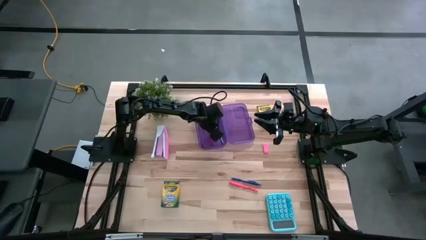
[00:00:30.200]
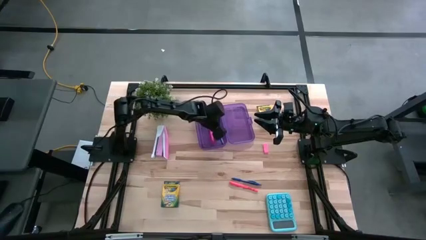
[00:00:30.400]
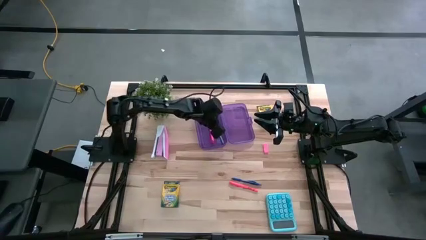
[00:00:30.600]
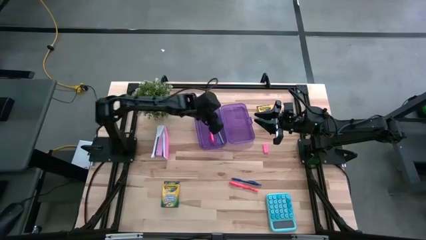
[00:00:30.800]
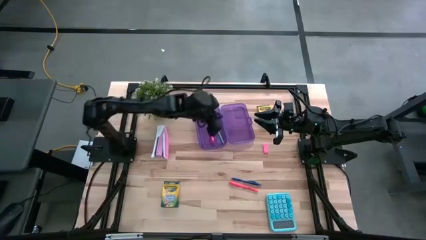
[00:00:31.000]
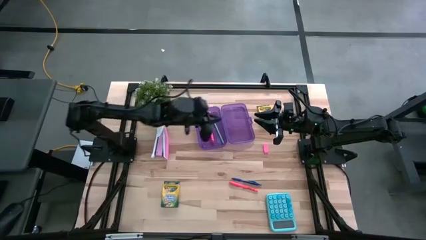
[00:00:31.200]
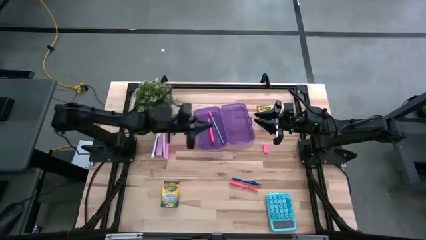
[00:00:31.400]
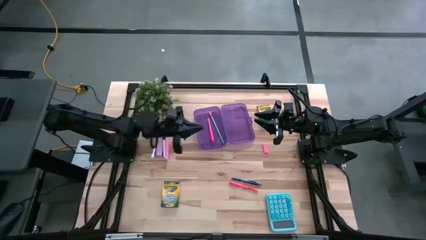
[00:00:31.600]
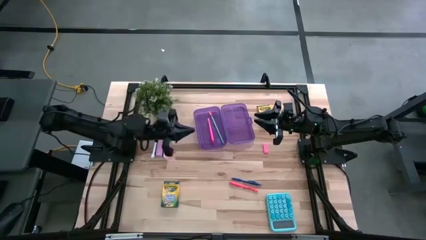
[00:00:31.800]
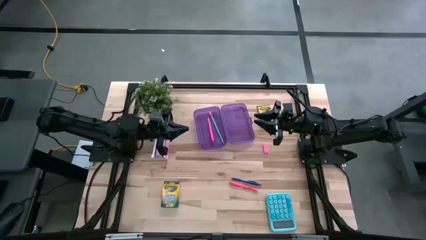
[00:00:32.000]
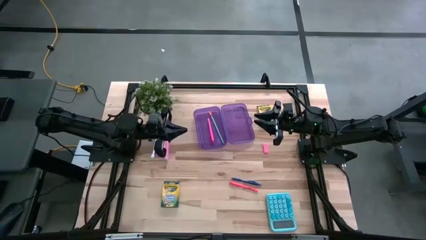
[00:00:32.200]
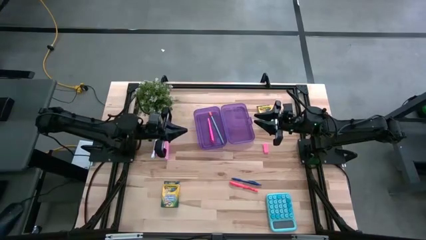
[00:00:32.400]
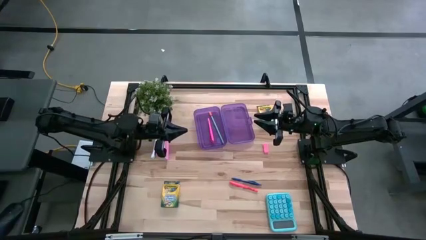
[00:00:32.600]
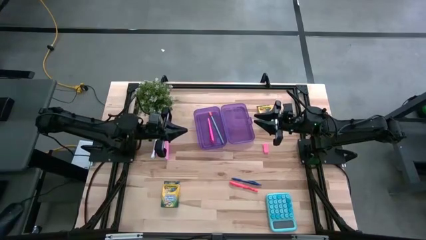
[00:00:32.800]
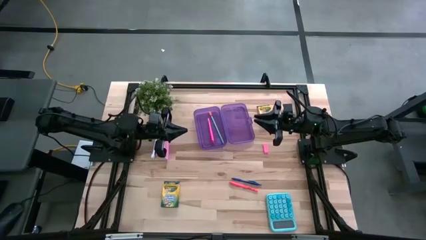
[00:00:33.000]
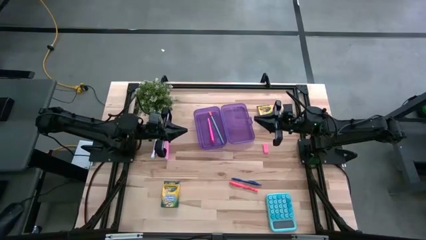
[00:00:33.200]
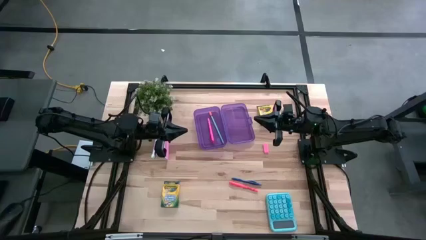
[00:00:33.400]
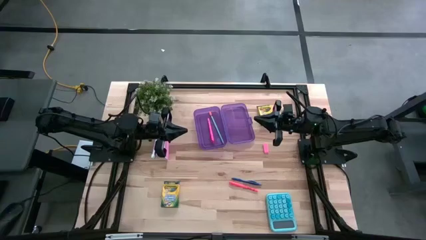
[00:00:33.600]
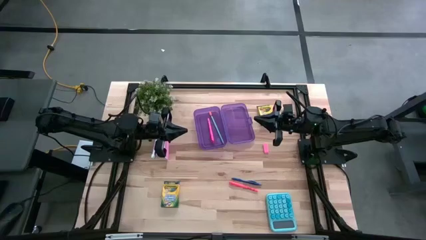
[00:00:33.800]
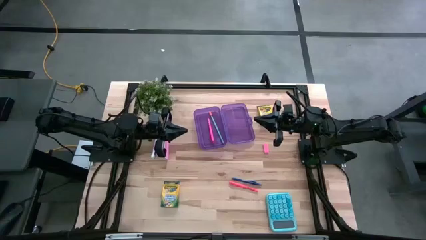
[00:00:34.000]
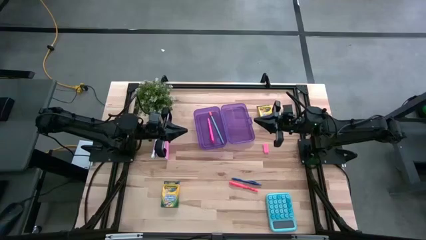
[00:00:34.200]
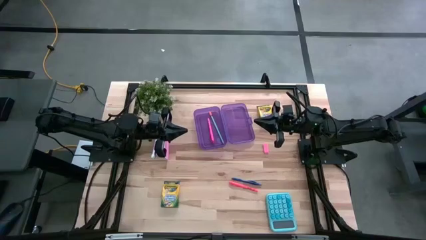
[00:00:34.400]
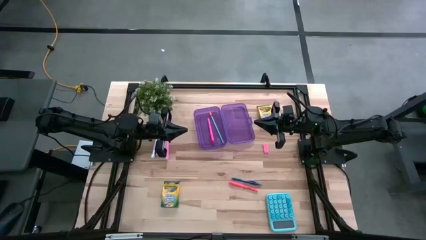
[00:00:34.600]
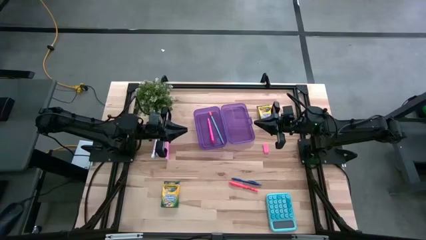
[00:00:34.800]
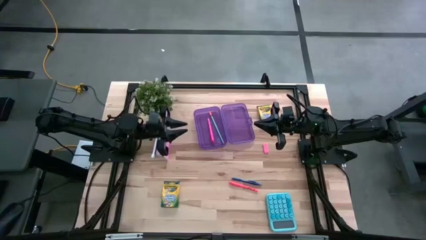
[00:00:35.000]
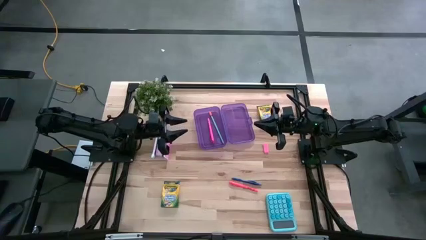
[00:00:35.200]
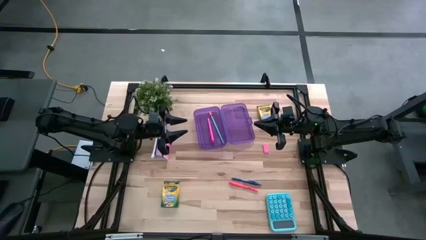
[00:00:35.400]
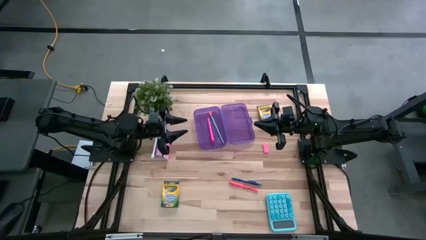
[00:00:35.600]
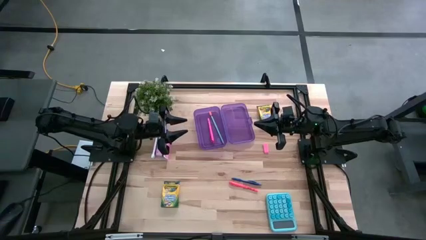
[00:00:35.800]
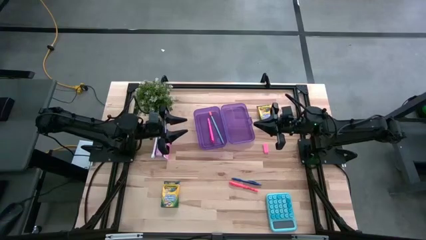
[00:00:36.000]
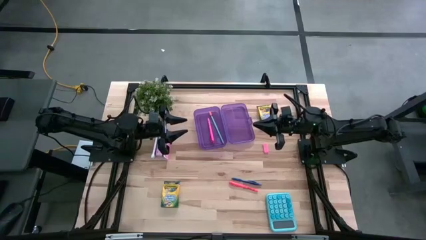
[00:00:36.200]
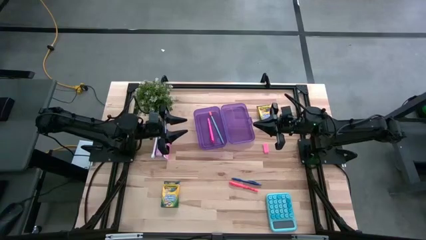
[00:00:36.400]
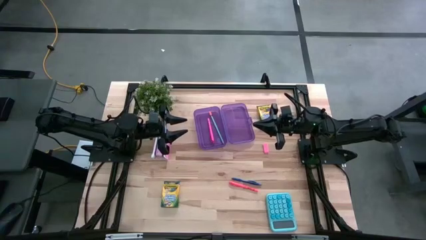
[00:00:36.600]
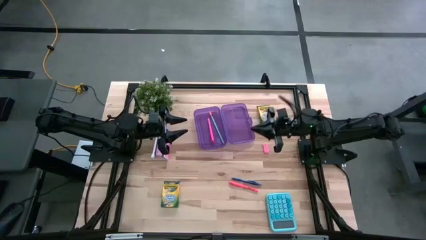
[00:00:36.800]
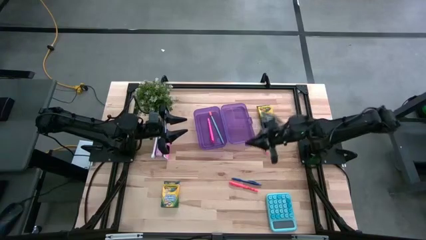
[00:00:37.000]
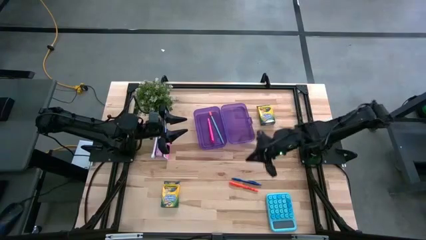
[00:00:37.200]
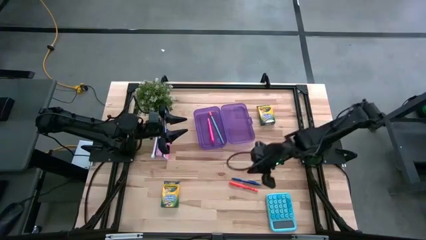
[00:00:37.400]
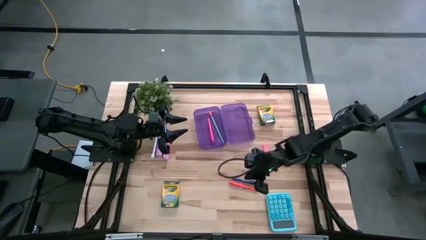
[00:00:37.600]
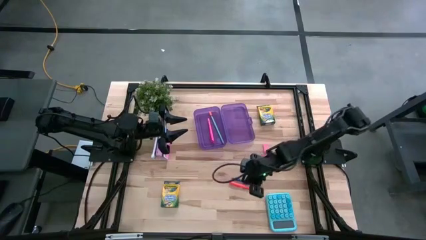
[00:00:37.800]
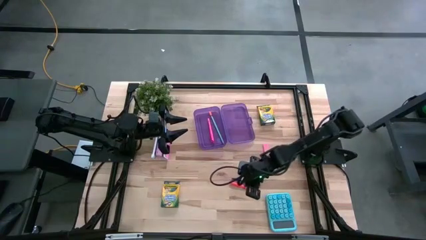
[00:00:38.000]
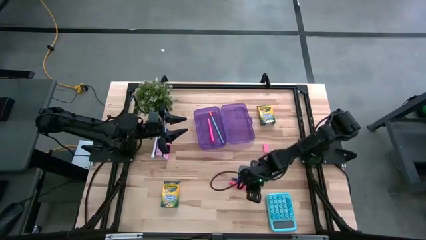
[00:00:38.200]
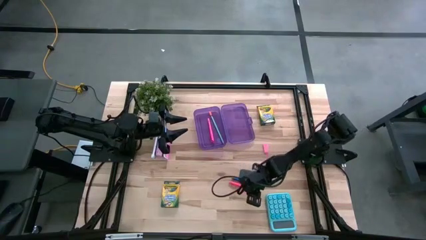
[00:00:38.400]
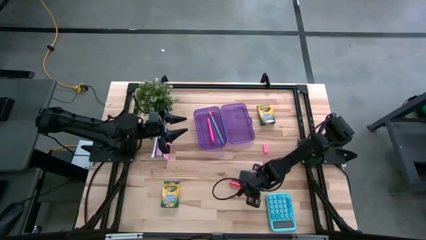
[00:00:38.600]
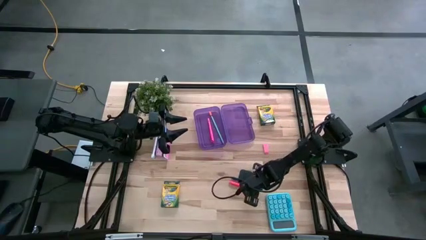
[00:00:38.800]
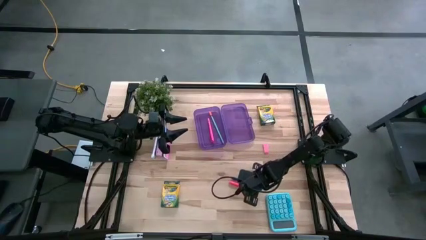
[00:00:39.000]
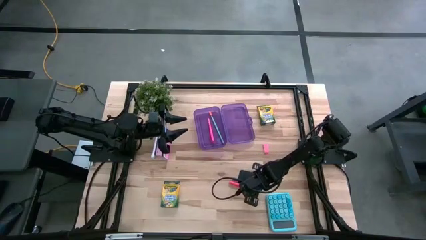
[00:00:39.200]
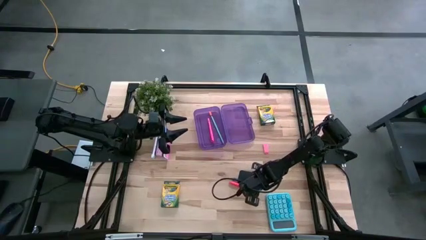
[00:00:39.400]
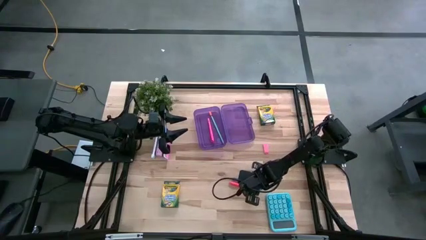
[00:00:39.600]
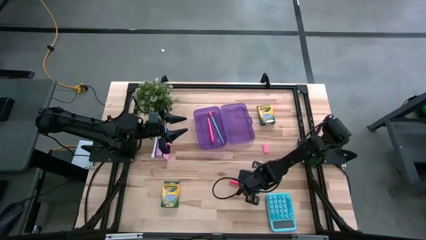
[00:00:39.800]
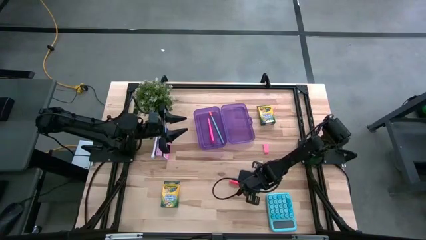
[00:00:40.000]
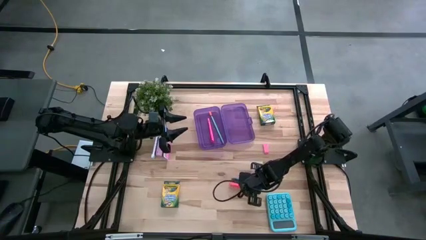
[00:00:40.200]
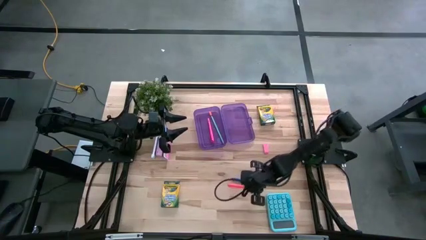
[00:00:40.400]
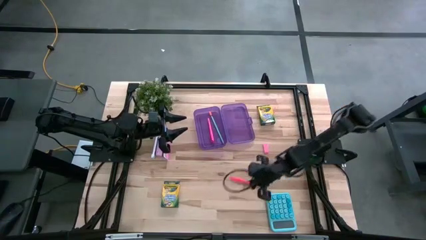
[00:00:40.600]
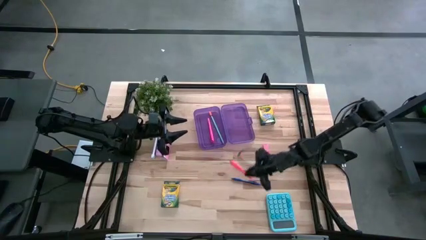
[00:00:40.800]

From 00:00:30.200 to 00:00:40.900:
Task: Pick & place school supplies into a supply box
Put the orange pen into the purple supply box
